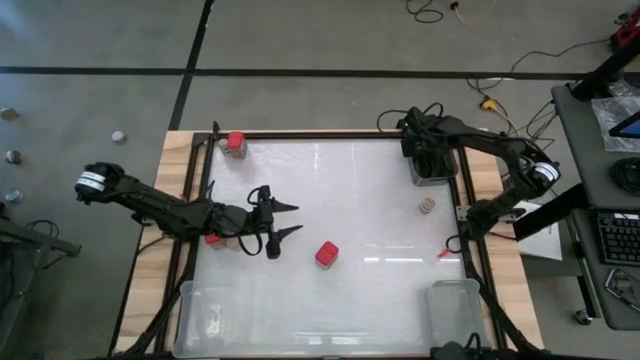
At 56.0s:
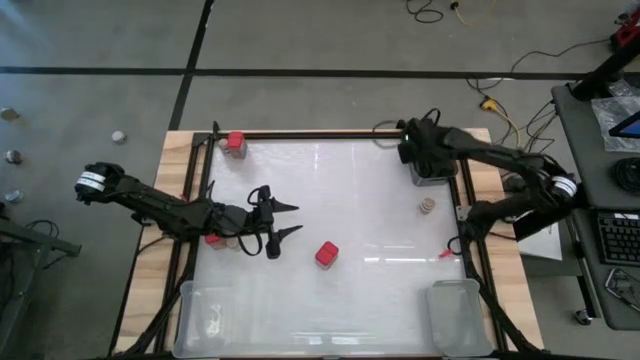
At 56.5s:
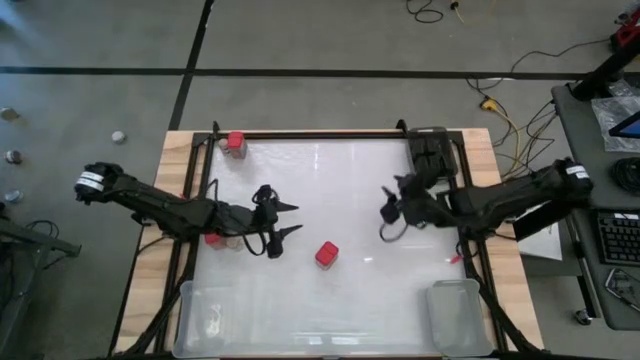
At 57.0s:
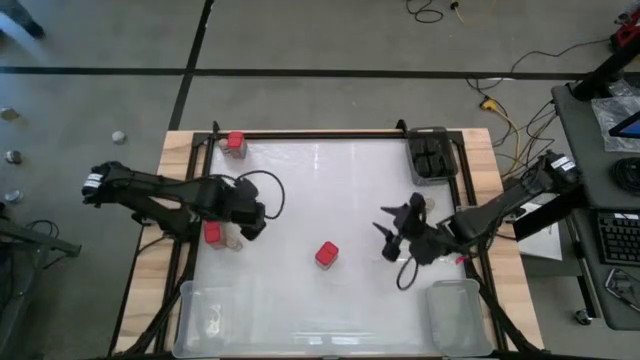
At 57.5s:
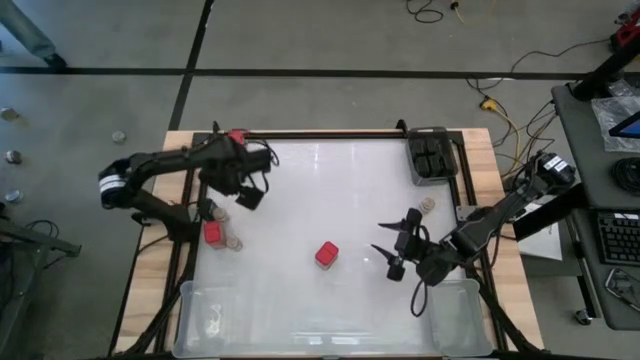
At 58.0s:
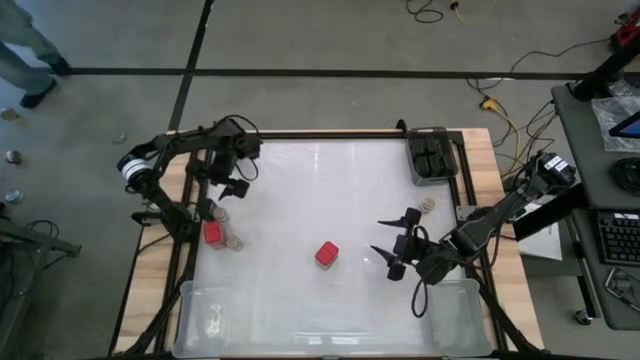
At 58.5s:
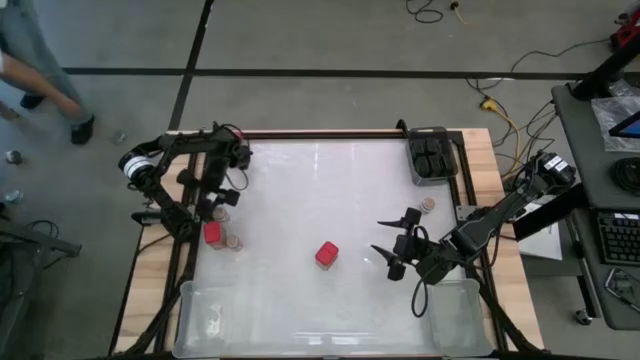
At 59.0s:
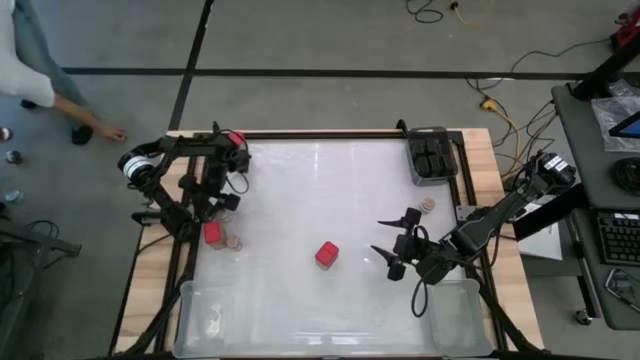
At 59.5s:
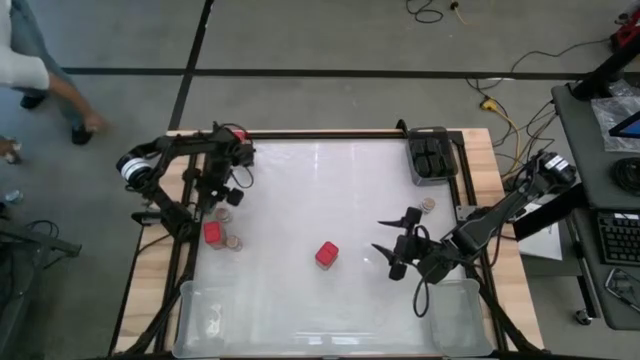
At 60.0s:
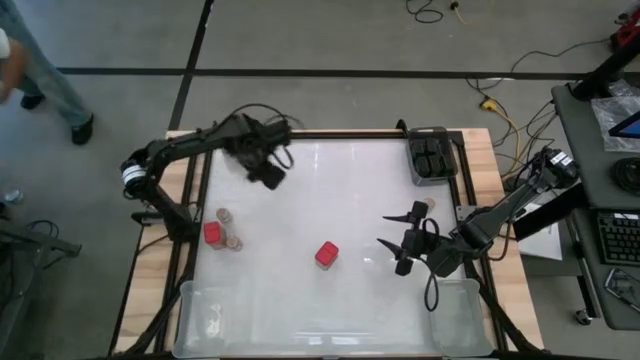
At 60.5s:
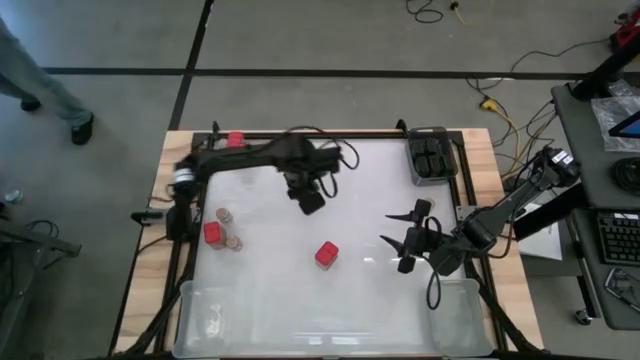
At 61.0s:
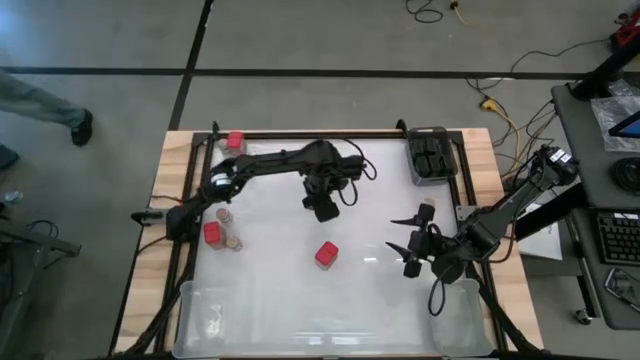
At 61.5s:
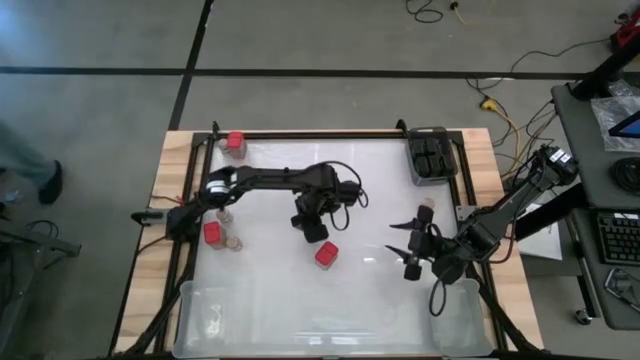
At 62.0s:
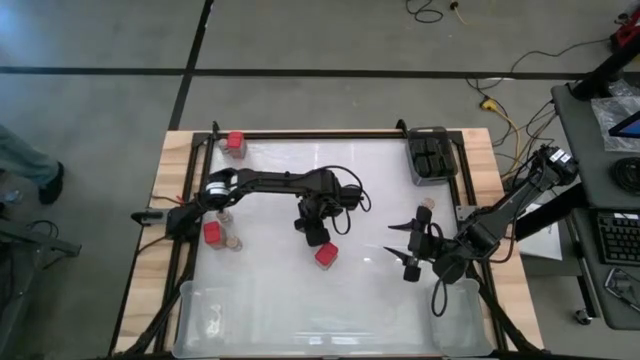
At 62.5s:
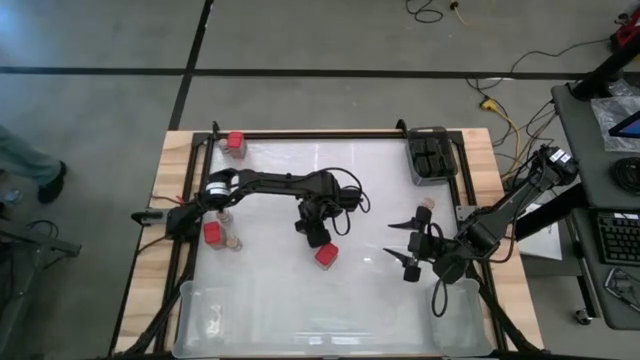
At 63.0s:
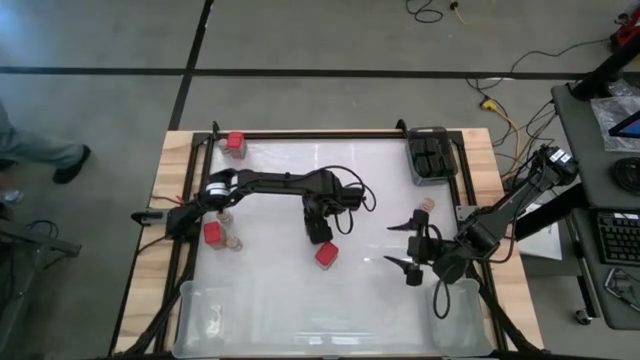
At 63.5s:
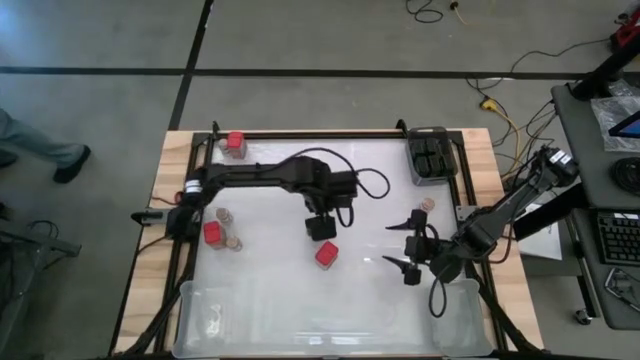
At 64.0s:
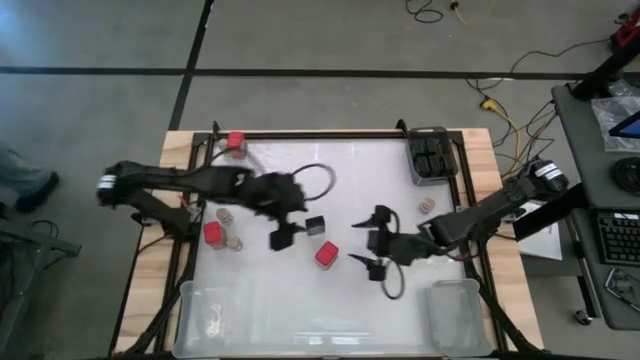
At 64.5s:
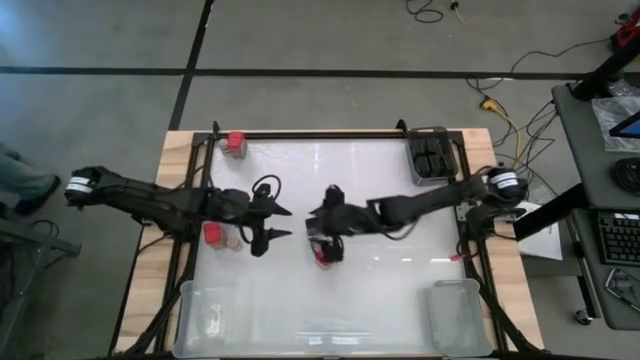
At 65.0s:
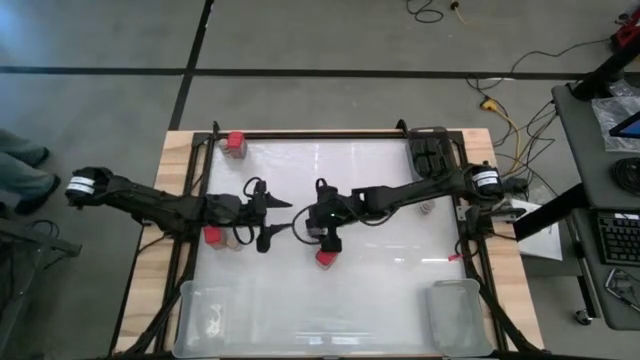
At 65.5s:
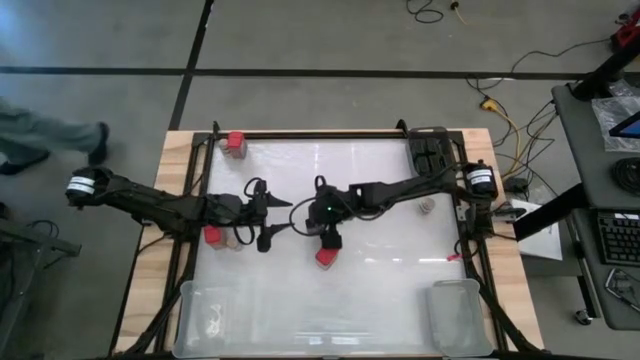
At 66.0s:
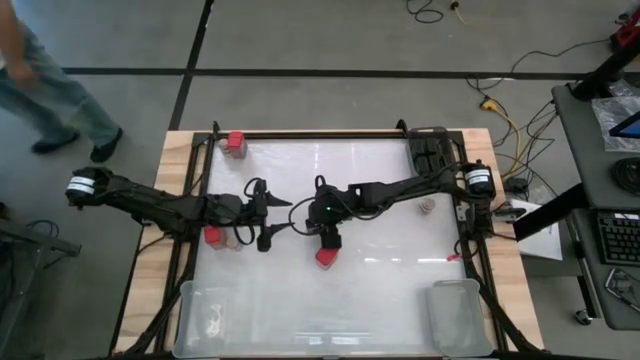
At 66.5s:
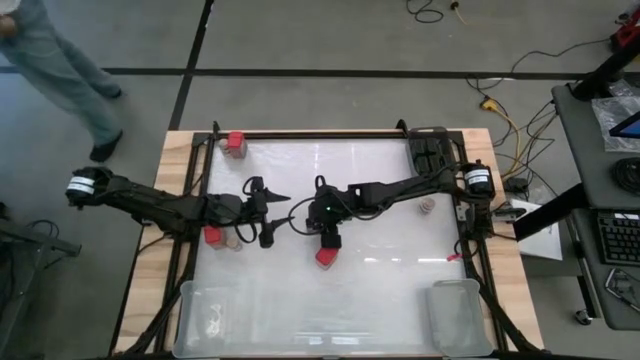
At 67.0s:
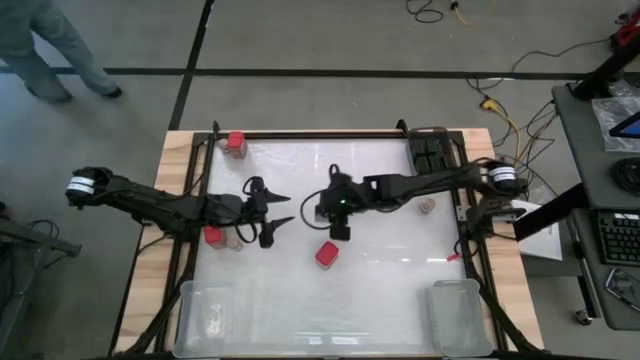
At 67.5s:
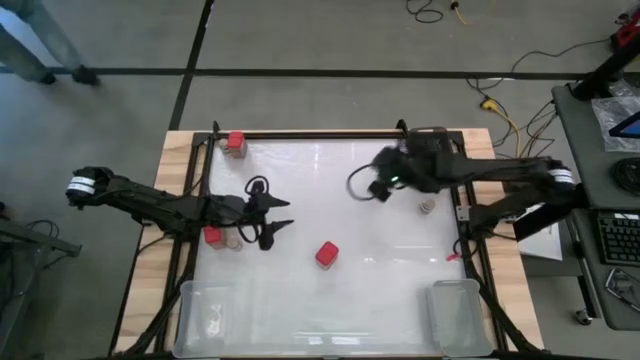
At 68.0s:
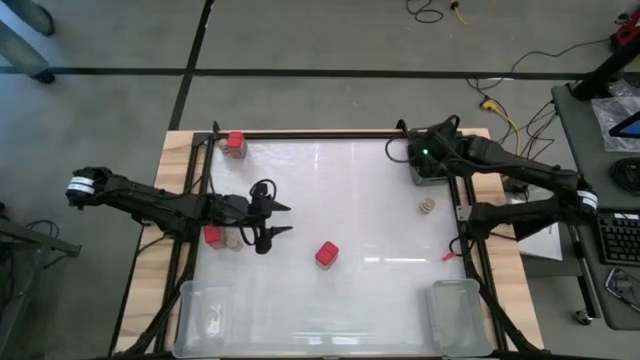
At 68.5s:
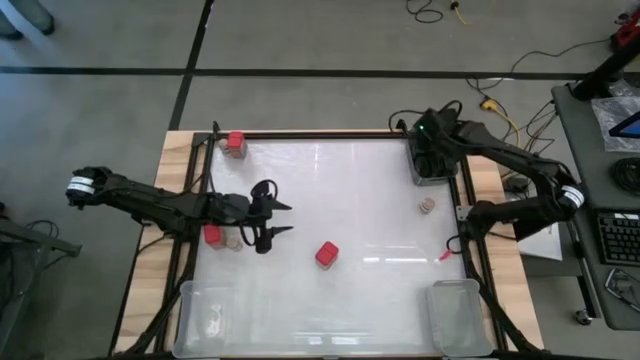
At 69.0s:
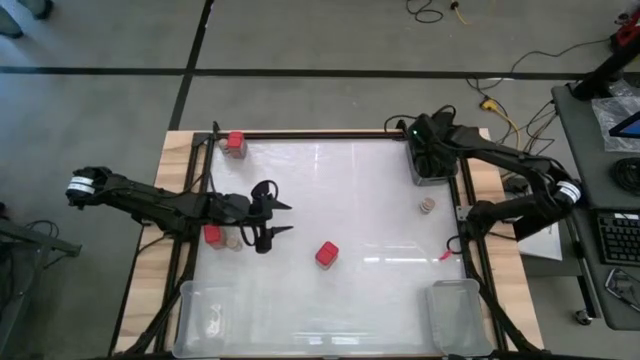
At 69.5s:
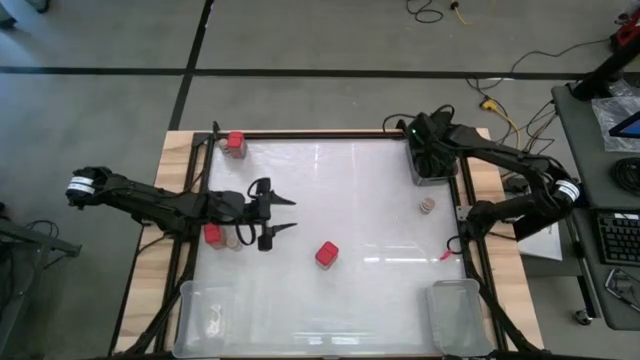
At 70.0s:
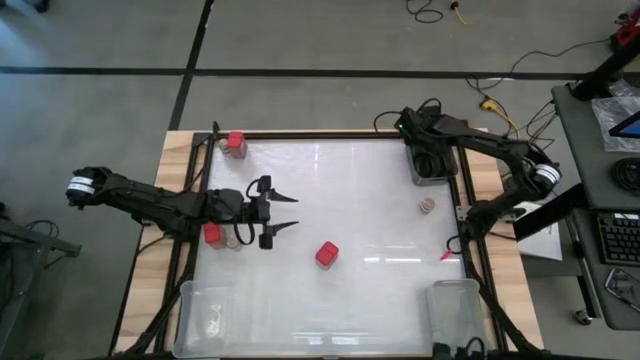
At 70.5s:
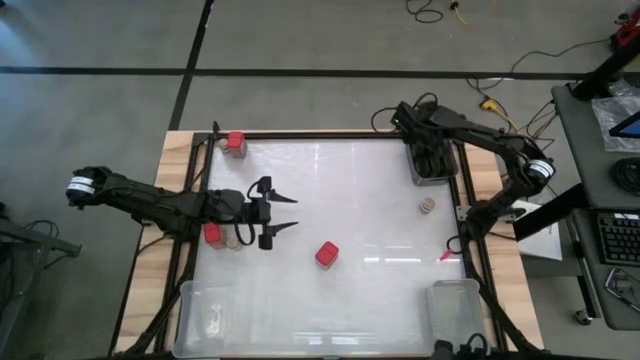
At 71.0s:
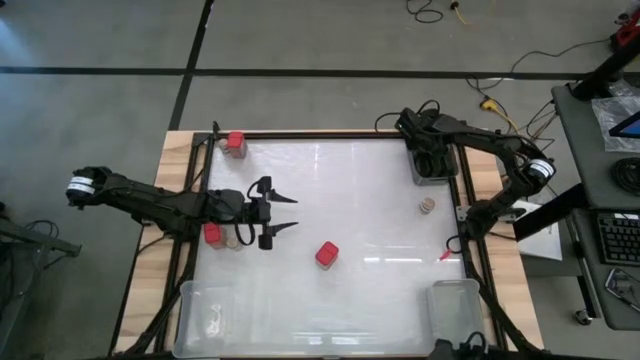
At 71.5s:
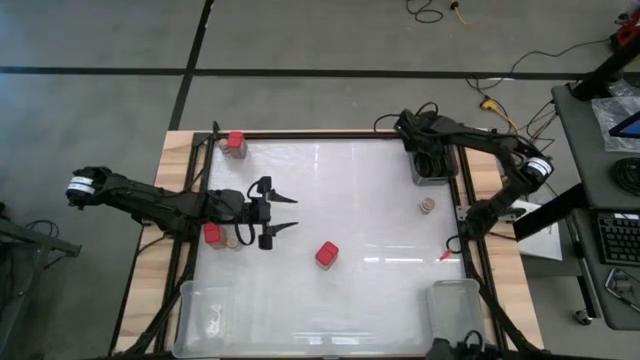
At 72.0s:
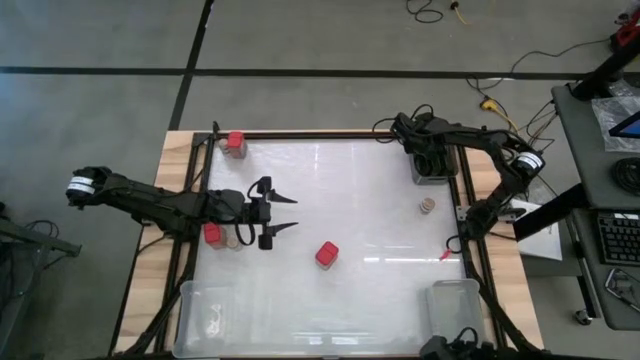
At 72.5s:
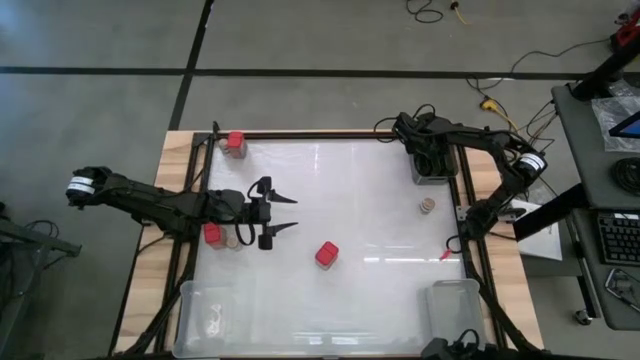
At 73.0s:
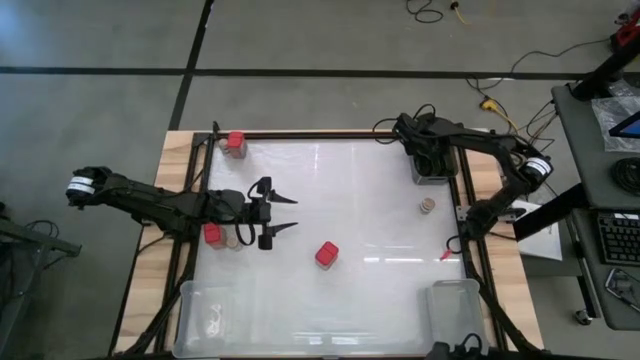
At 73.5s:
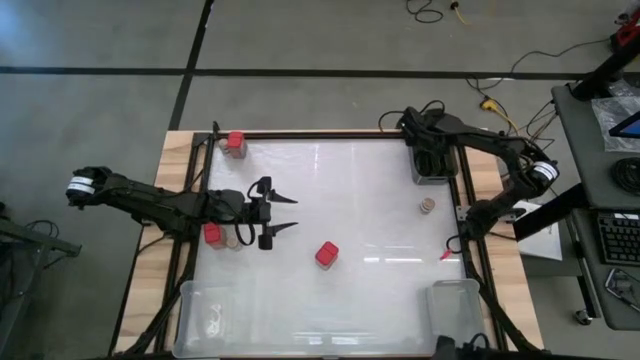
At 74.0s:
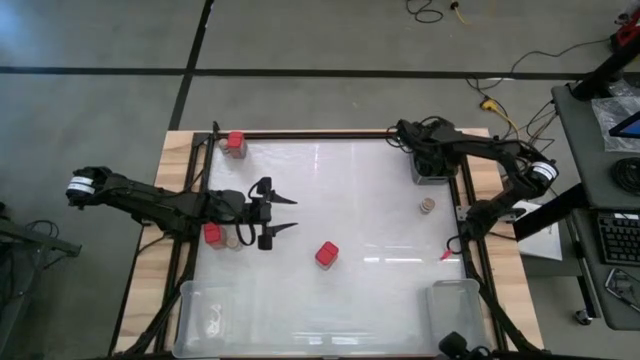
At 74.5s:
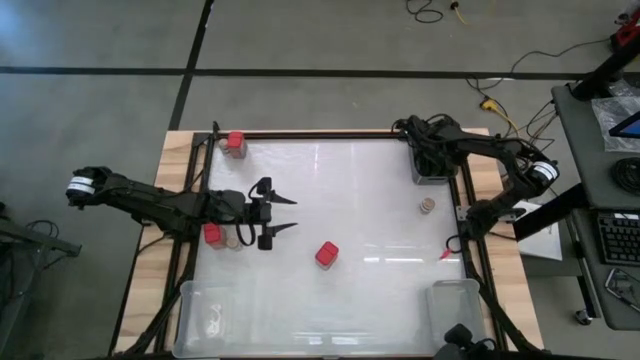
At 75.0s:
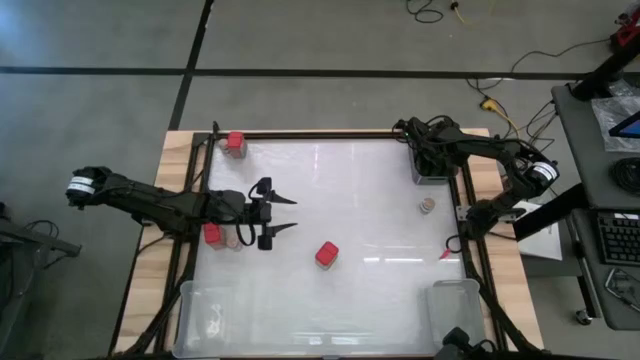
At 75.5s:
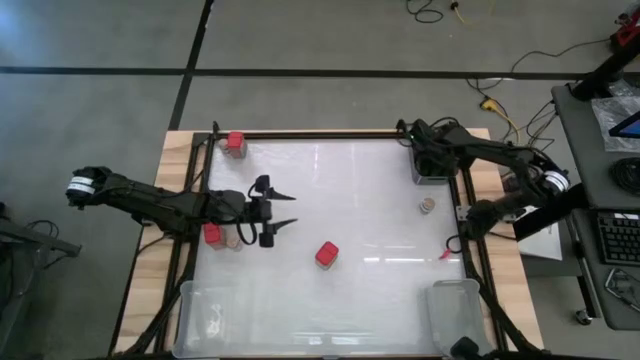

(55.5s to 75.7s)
Task: Sort spices by type
Put the green seasoning can into the black bin

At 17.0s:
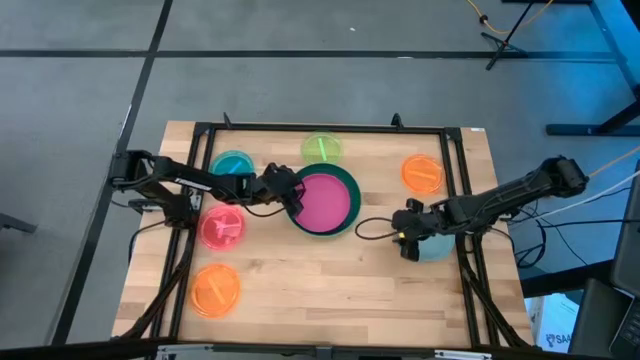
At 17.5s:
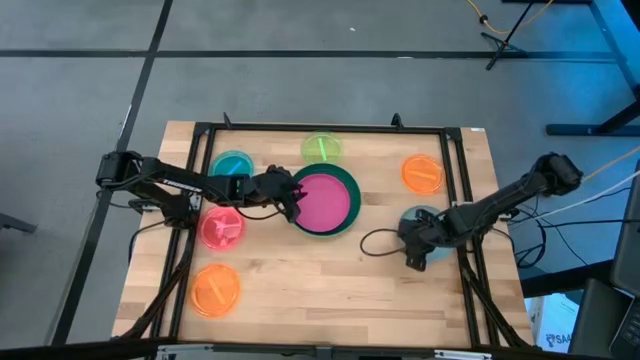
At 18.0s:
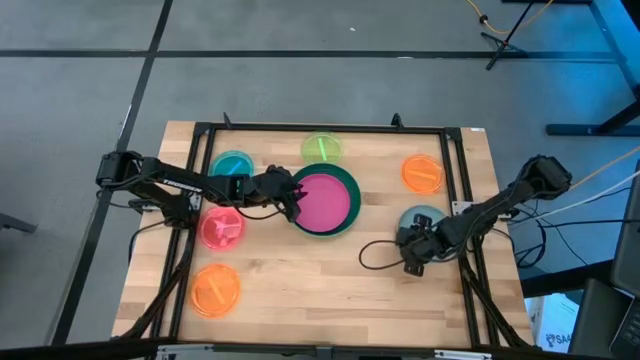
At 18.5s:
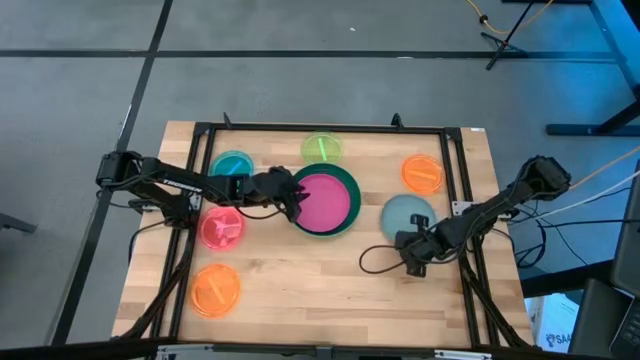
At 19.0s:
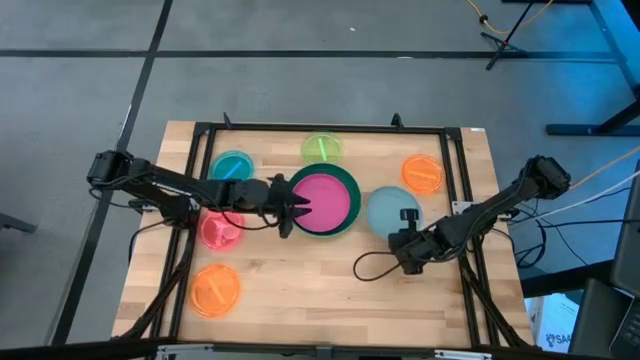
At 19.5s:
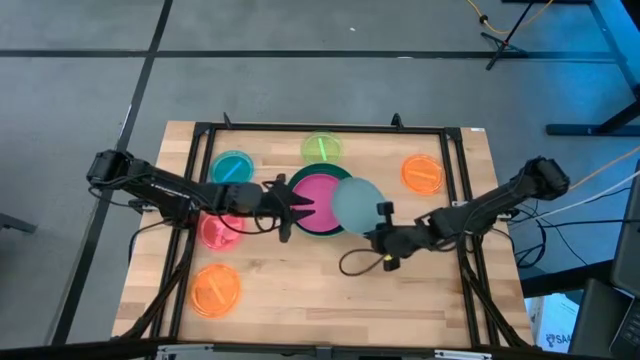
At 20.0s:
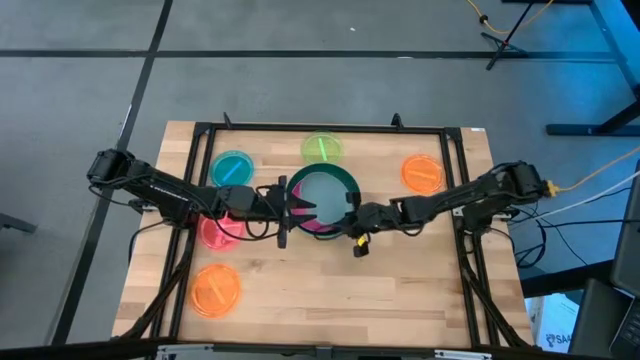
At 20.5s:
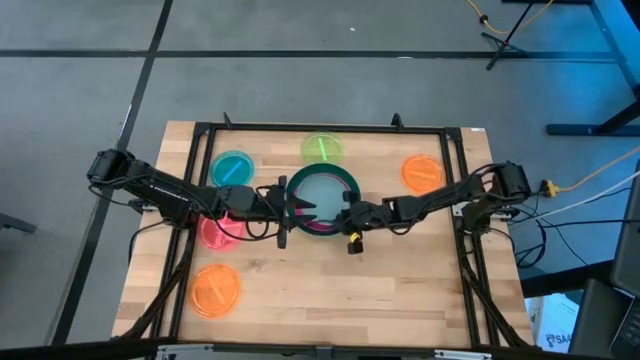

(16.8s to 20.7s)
Task: Stack plastic plates
Stack the gray plate on top of the pink plate
